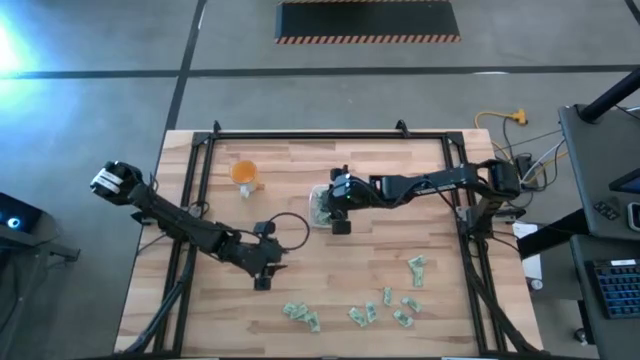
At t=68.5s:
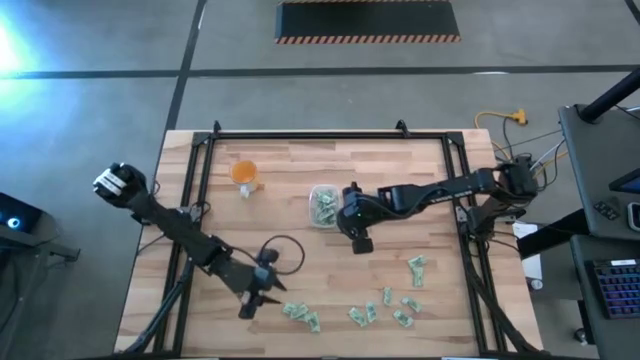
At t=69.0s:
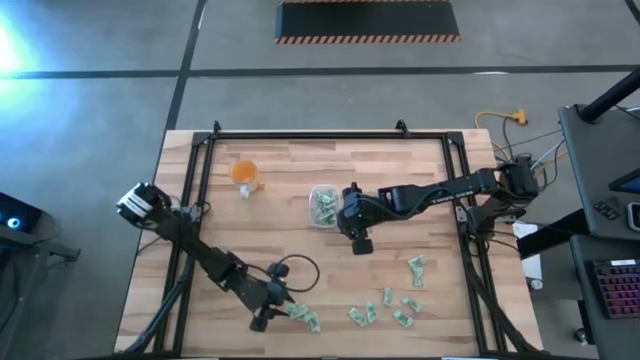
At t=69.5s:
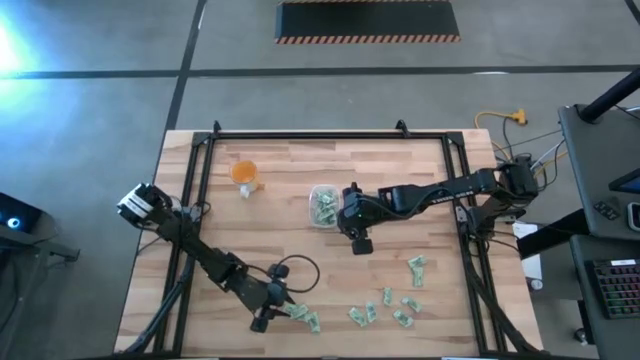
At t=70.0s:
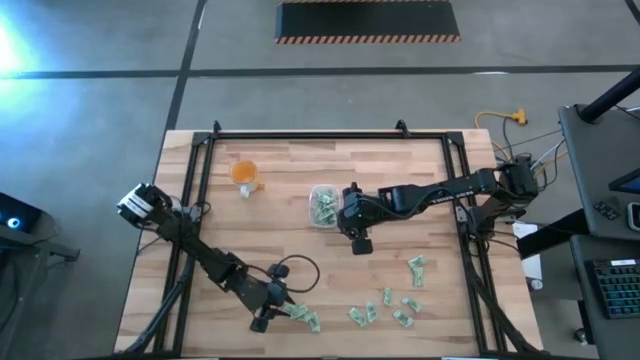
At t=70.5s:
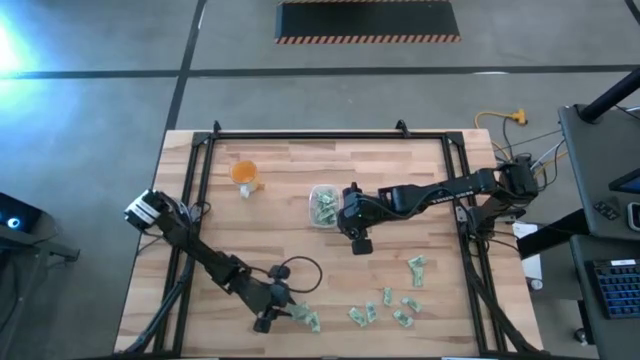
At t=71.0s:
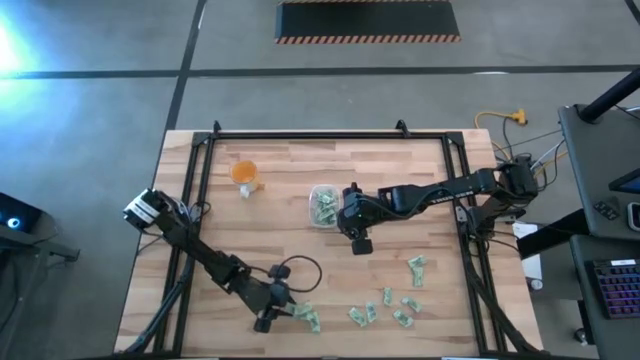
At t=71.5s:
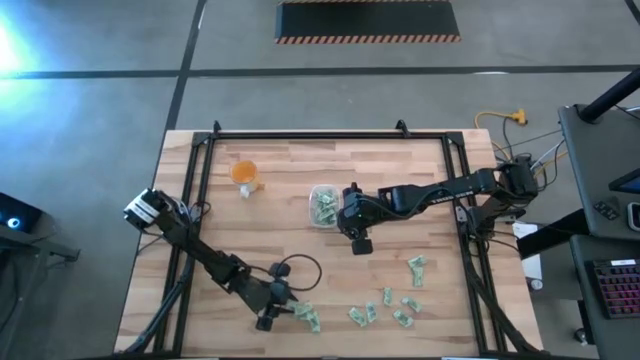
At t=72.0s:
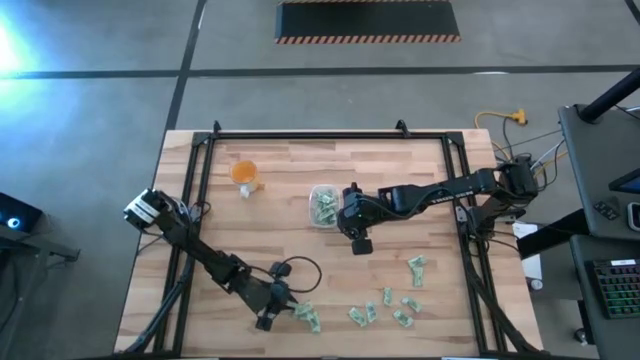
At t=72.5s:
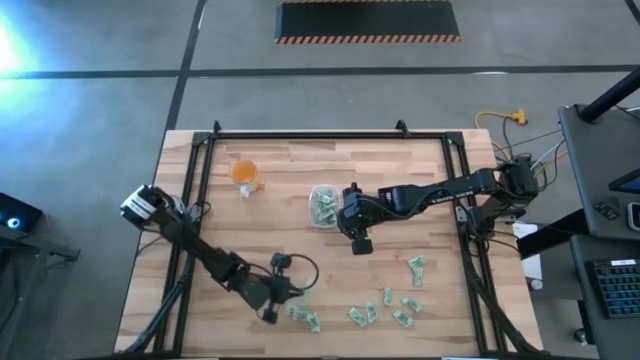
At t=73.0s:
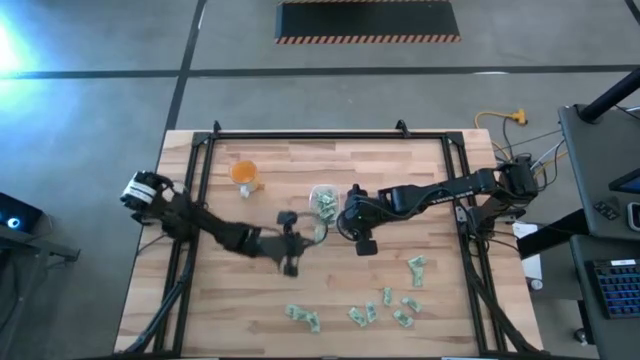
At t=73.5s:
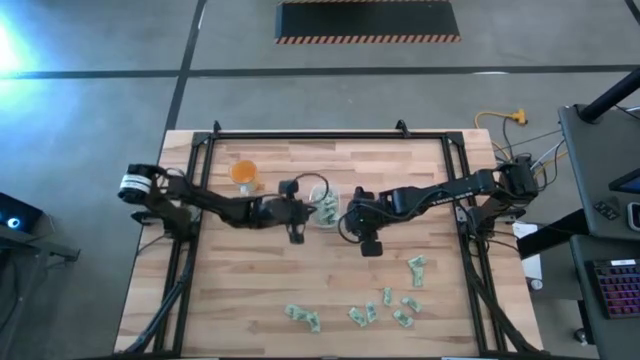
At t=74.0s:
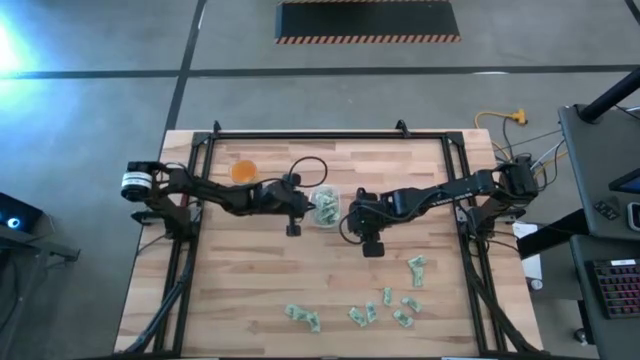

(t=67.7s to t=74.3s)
Task: Pick and place Stevia / Truvia into bins
Put the stevia packet into the bin

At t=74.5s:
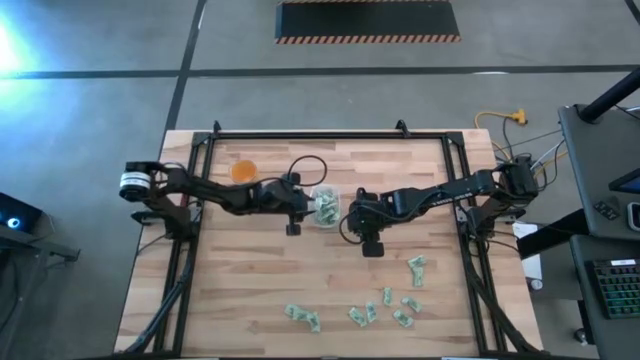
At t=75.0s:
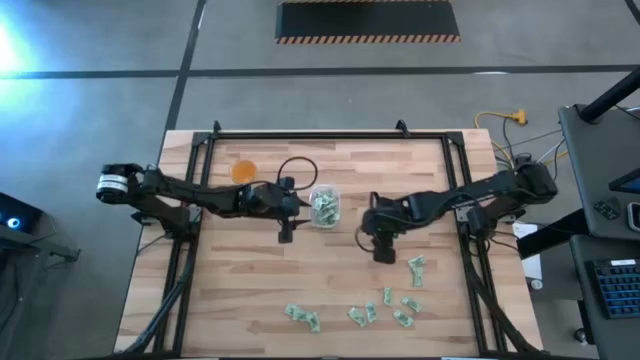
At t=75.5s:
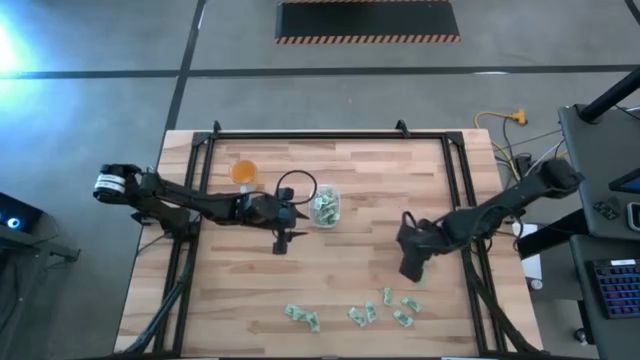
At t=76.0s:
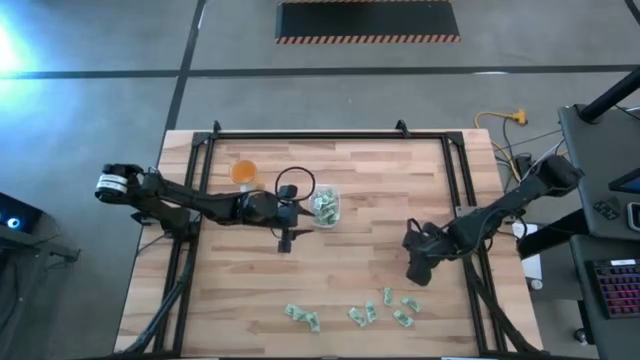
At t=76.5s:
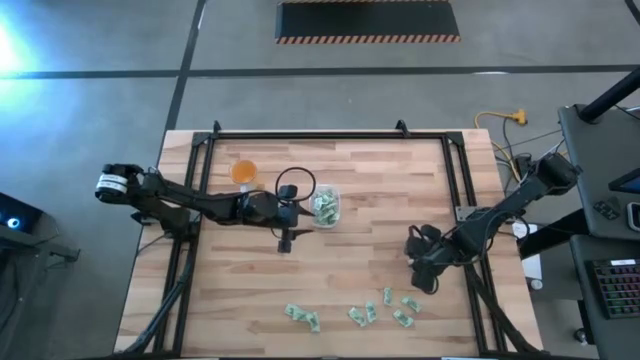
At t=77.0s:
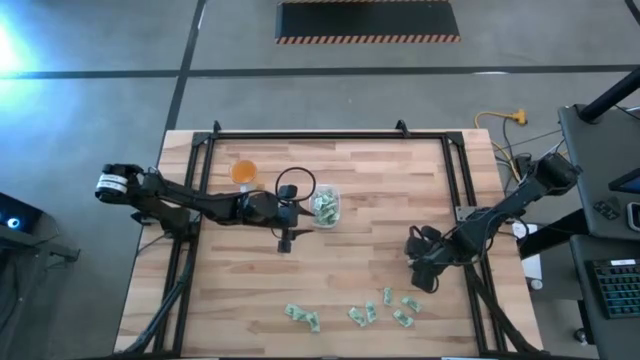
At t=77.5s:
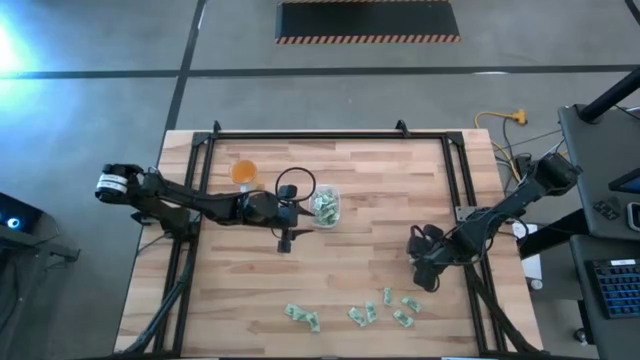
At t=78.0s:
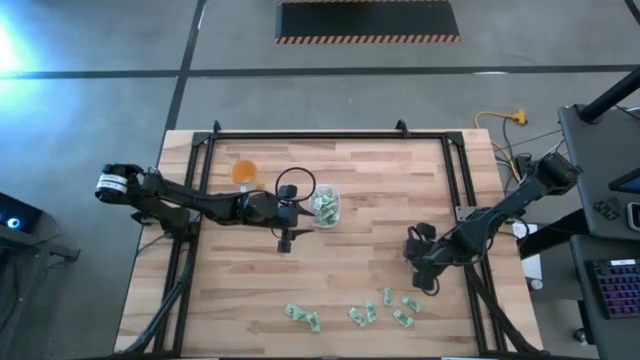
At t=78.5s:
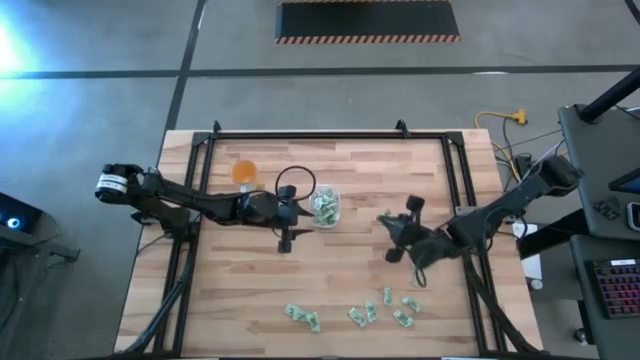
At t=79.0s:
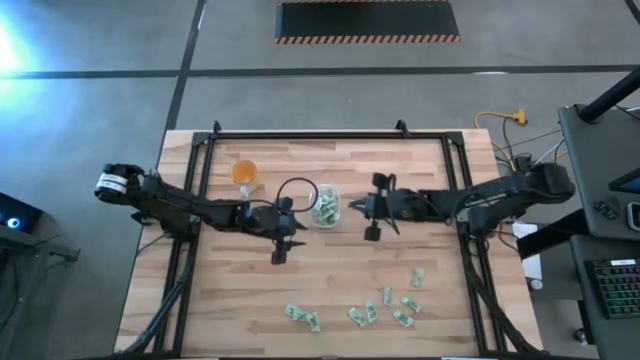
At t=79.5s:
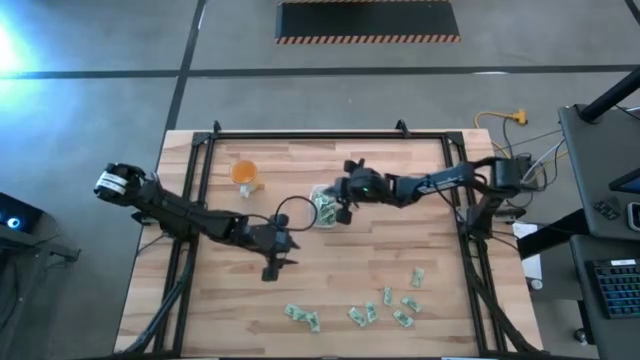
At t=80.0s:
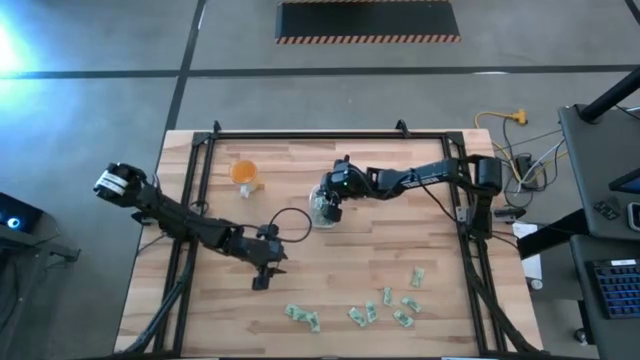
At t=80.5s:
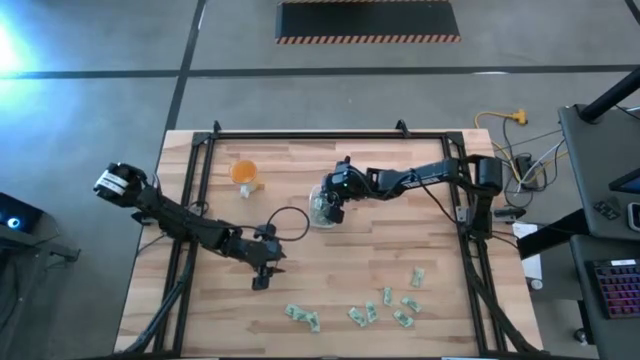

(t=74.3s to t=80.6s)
Put the stevia packet into the bin

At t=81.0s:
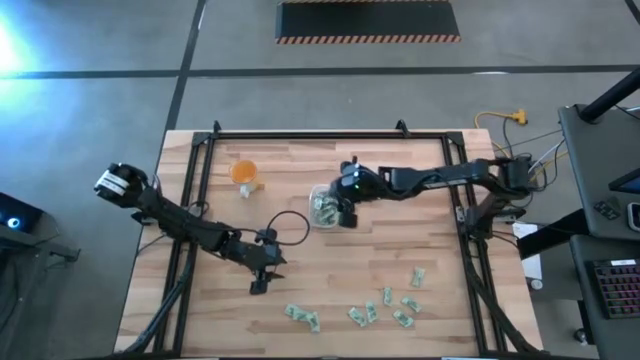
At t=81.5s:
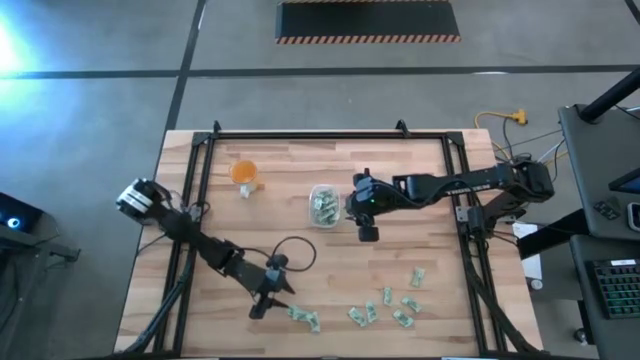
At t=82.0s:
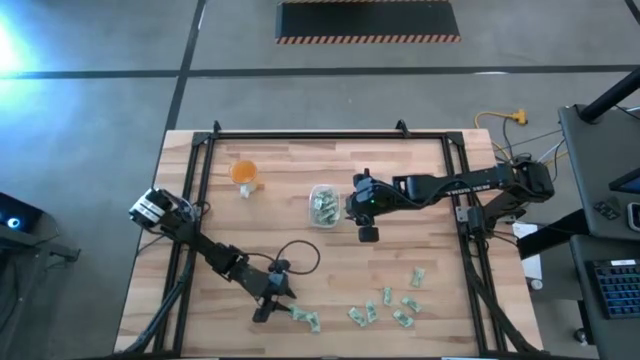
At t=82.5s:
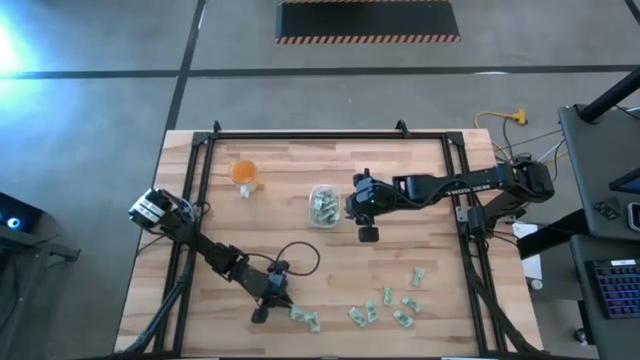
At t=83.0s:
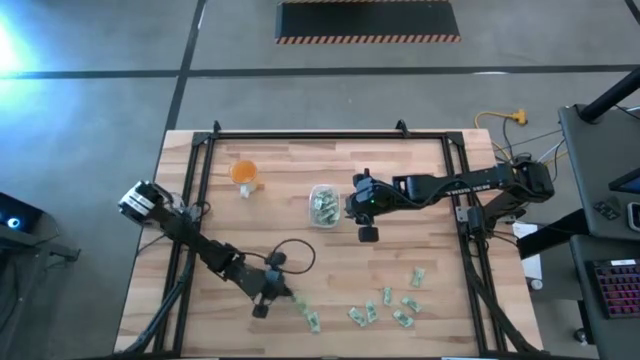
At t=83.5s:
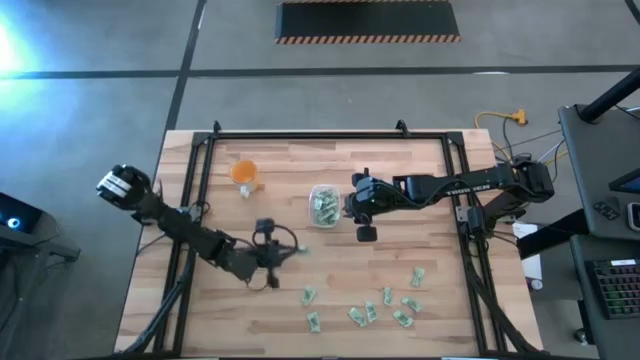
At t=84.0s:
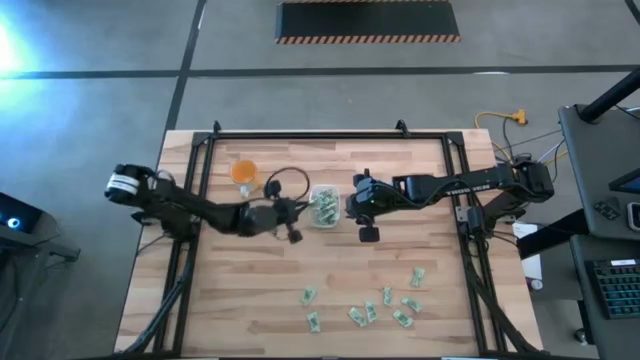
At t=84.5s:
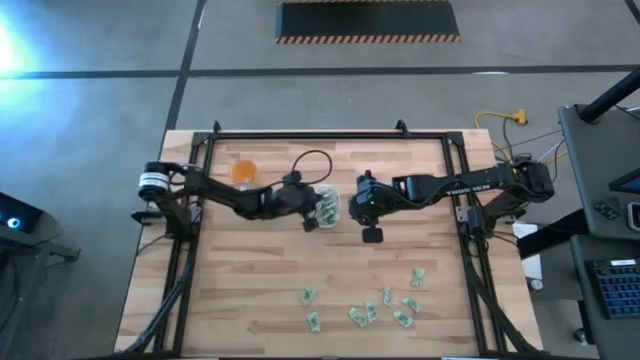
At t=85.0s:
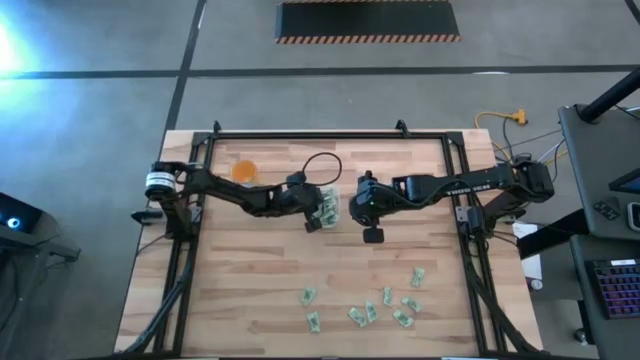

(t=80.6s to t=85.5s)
Put the stevia packet into the bin

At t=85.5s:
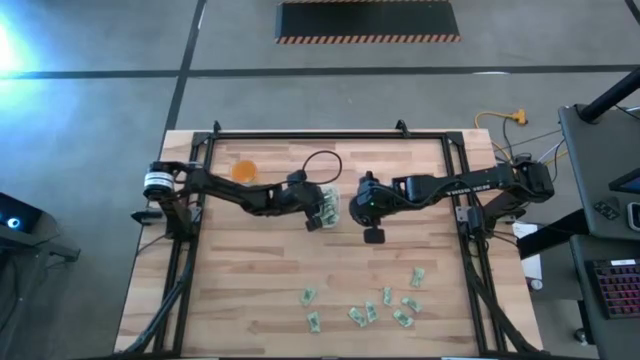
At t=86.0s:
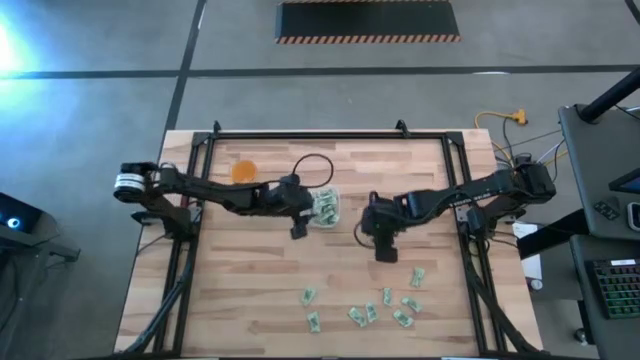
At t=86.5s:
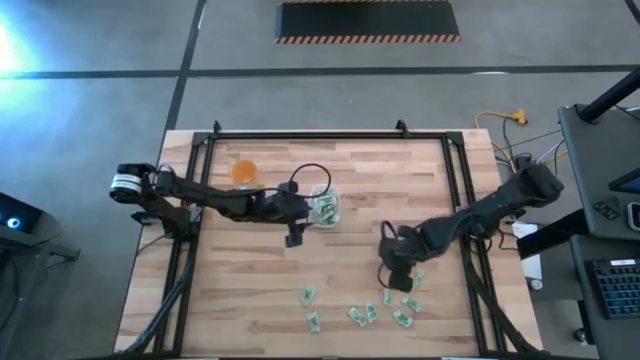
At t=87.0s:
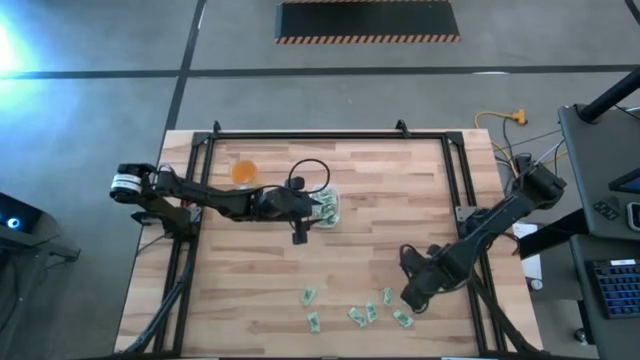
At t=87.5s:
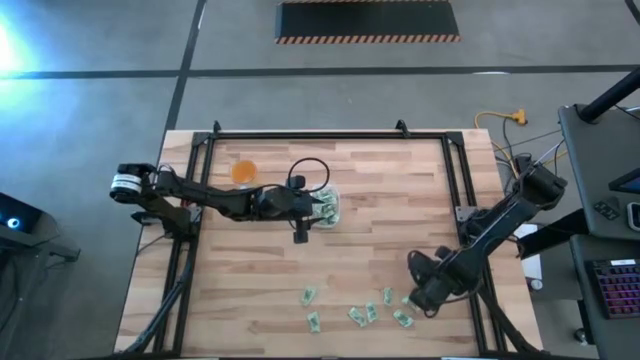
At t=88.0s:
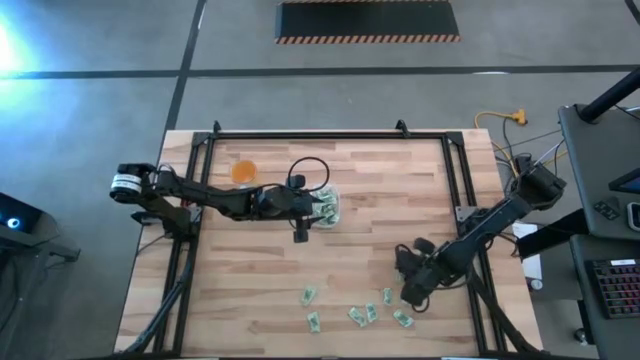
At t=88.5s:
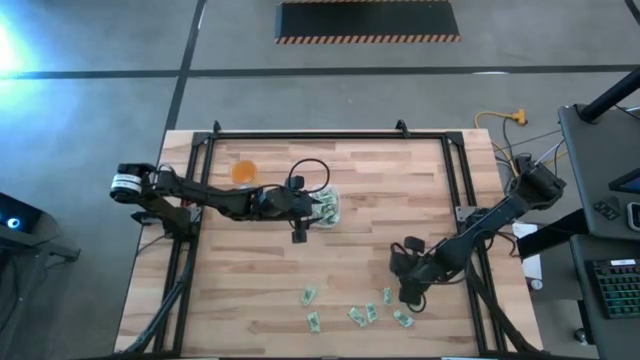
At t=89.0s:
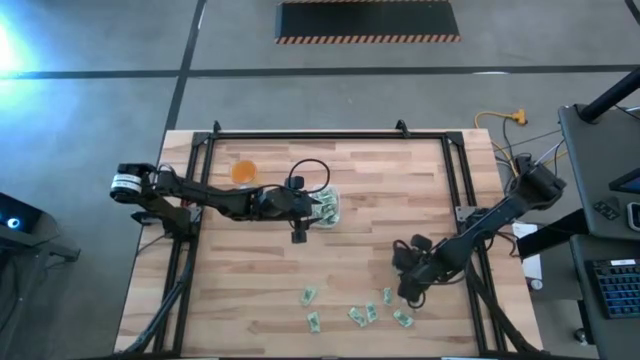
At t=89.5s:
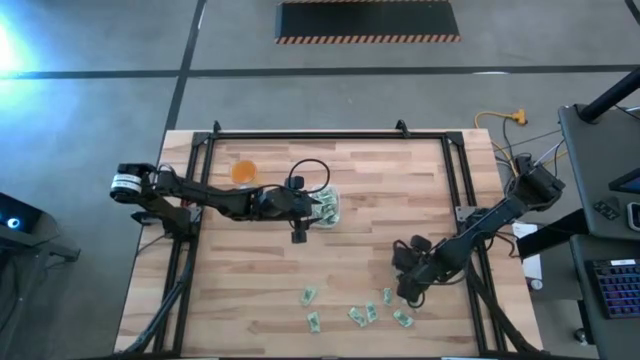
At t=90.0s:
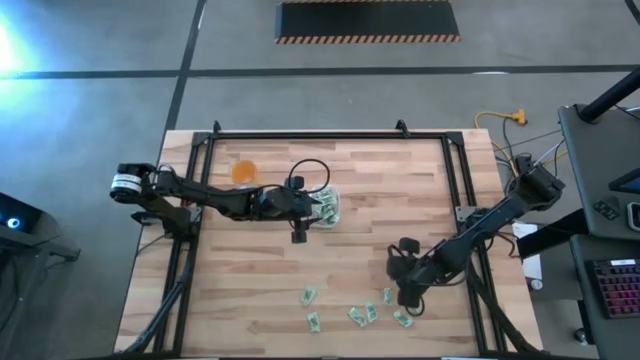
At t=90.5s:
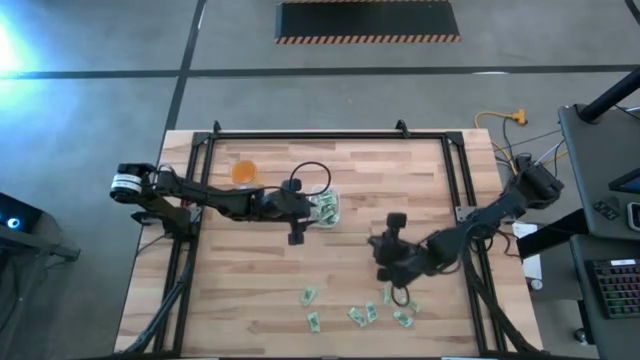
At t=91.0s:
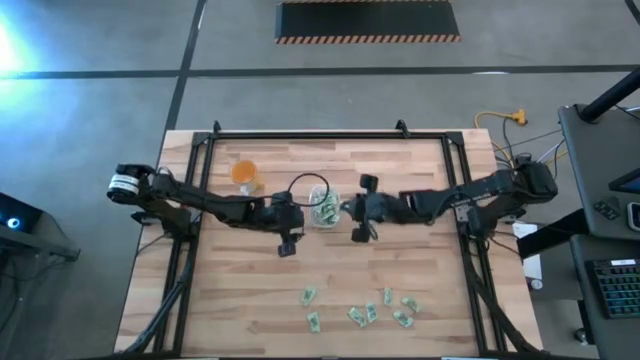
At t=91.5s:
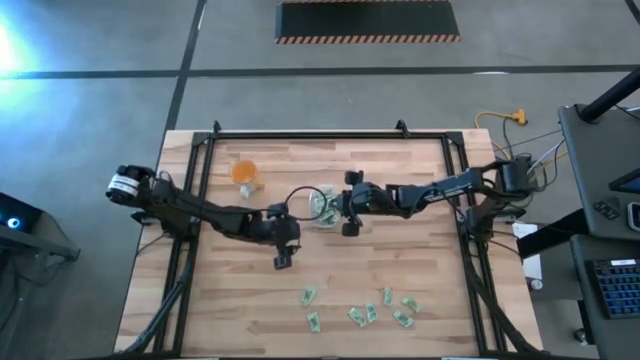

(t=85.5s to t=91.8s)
Put the stevia packet into the bin
